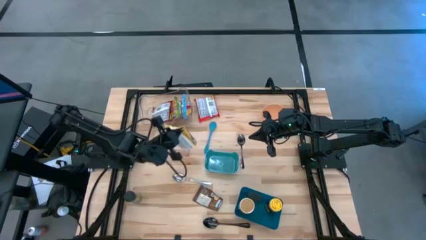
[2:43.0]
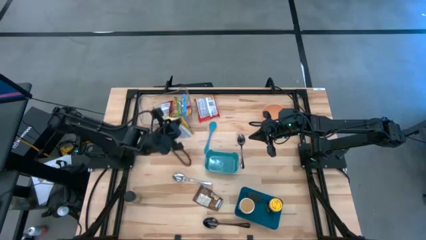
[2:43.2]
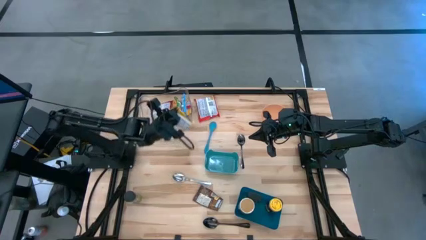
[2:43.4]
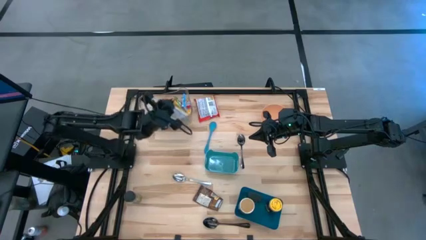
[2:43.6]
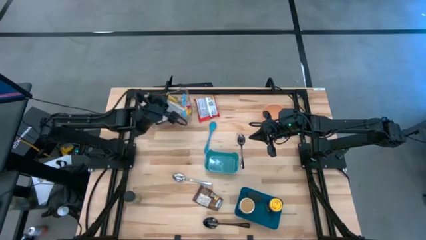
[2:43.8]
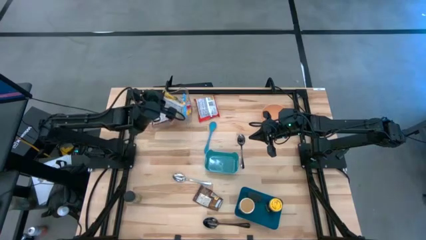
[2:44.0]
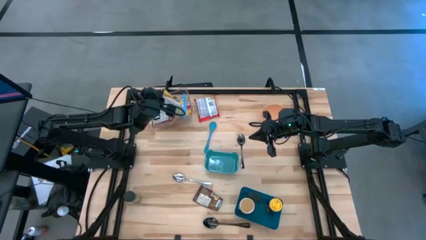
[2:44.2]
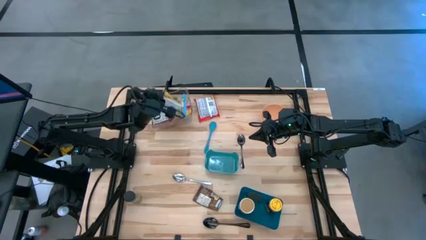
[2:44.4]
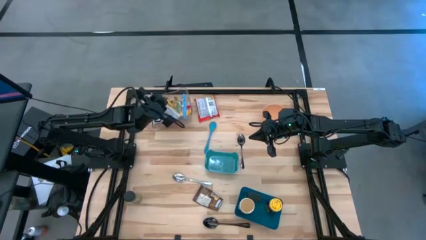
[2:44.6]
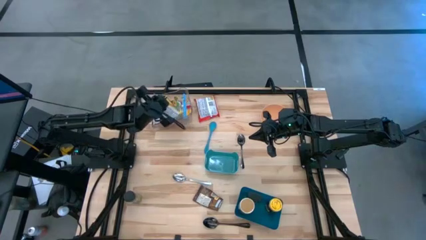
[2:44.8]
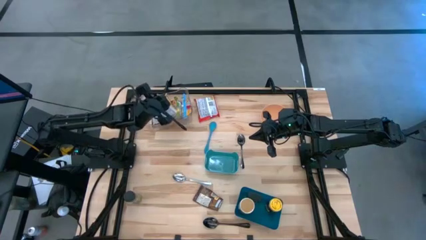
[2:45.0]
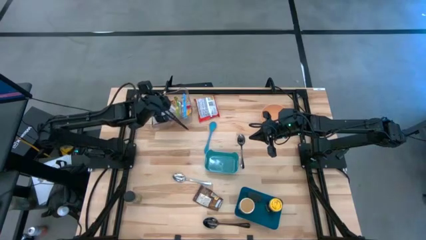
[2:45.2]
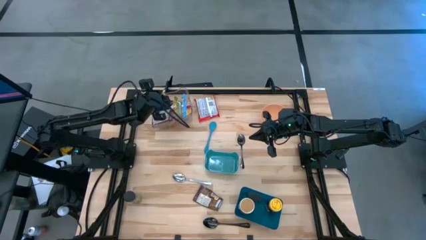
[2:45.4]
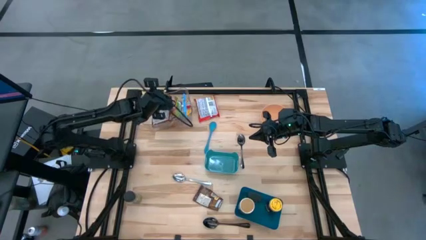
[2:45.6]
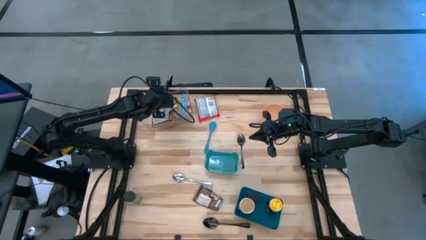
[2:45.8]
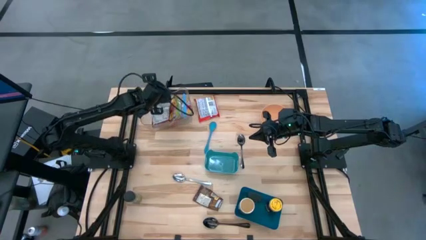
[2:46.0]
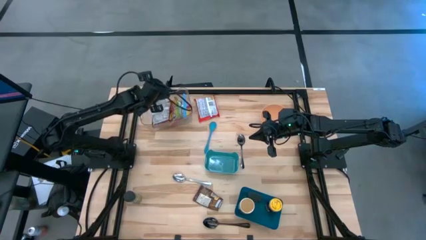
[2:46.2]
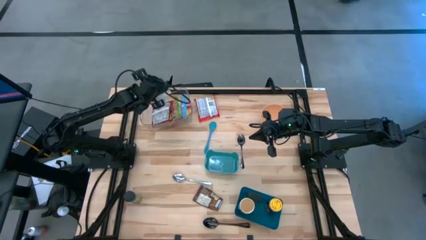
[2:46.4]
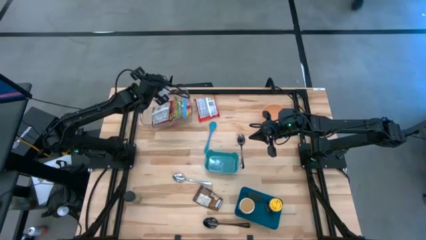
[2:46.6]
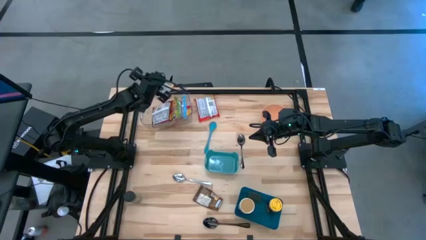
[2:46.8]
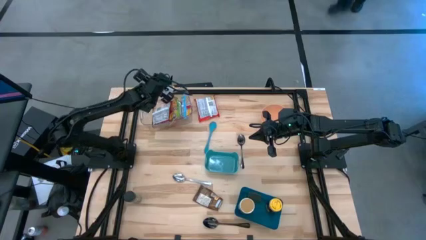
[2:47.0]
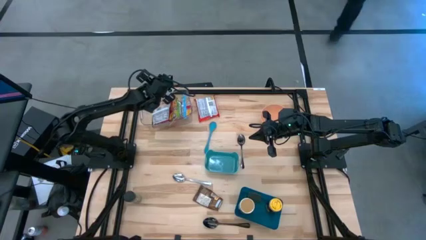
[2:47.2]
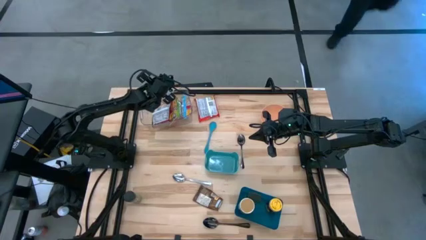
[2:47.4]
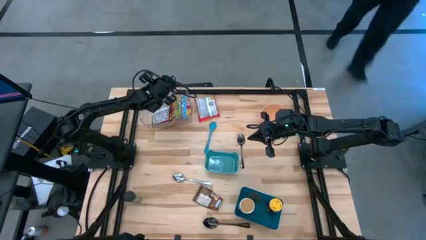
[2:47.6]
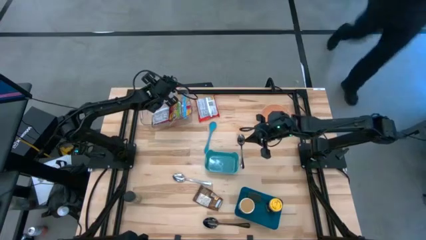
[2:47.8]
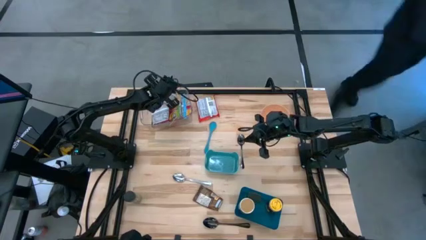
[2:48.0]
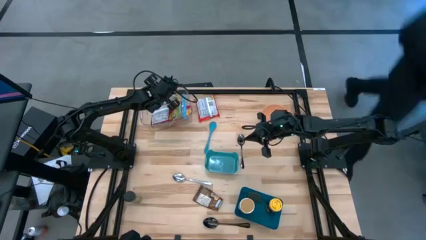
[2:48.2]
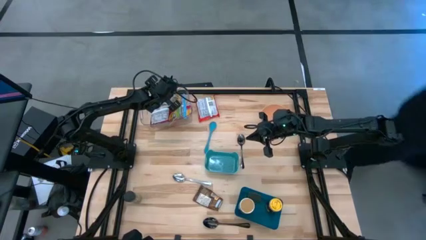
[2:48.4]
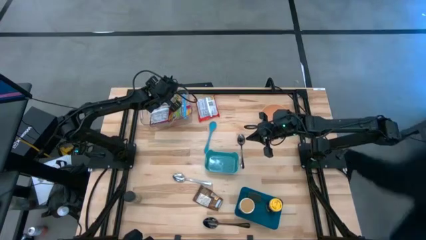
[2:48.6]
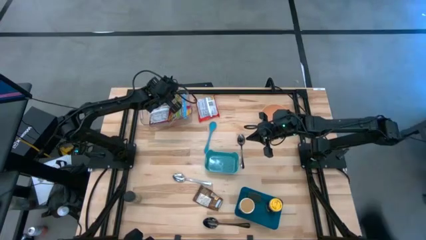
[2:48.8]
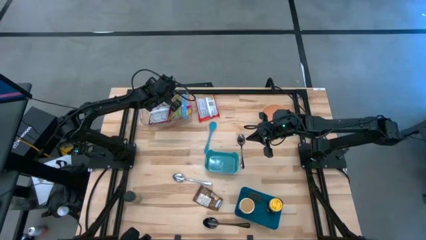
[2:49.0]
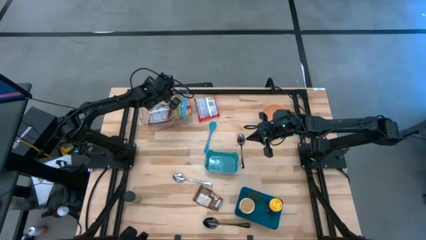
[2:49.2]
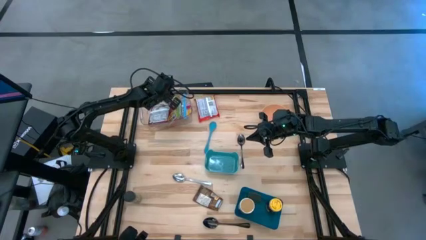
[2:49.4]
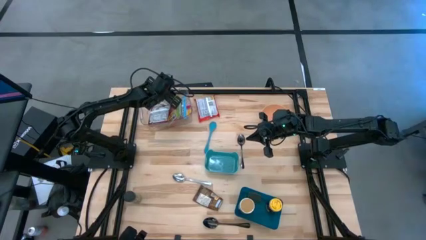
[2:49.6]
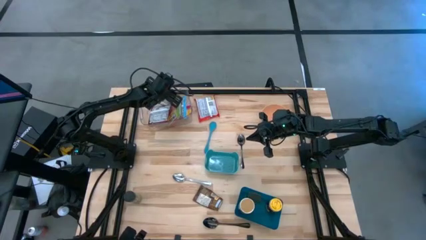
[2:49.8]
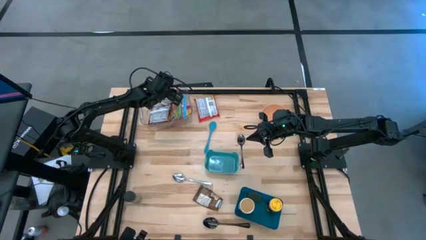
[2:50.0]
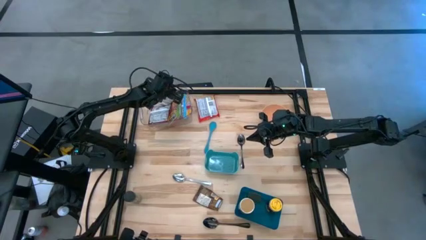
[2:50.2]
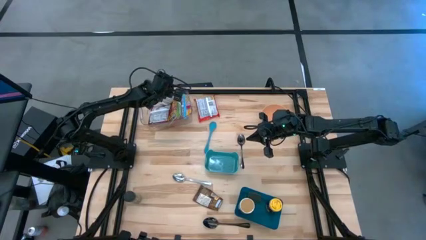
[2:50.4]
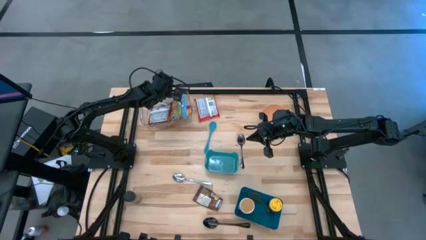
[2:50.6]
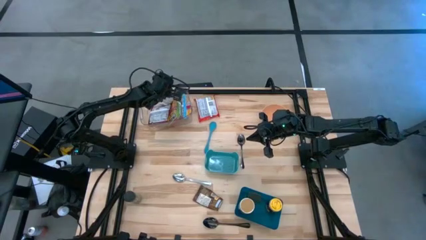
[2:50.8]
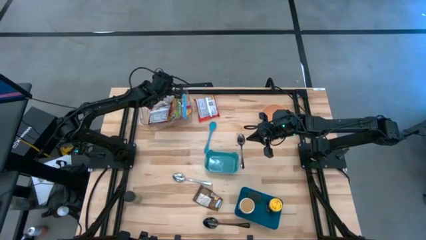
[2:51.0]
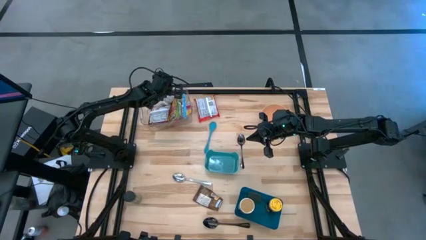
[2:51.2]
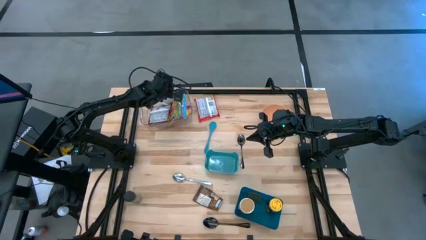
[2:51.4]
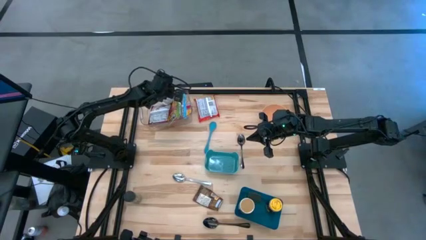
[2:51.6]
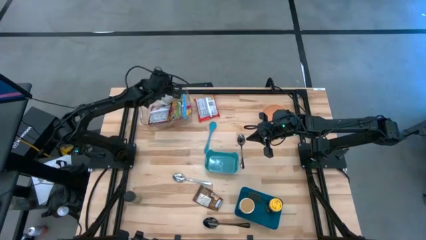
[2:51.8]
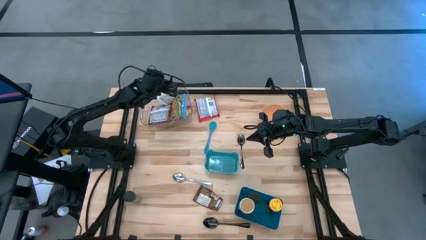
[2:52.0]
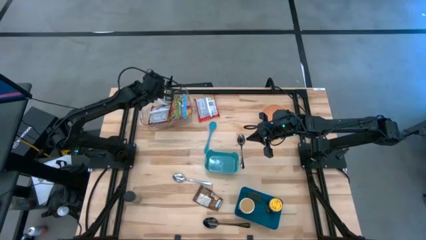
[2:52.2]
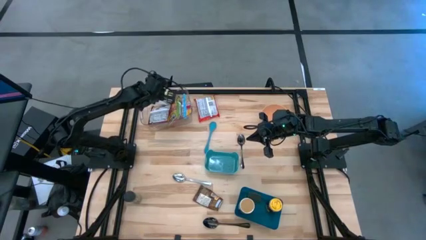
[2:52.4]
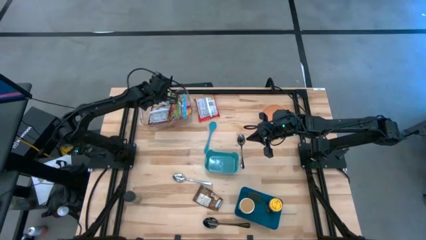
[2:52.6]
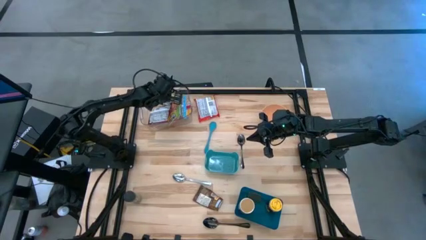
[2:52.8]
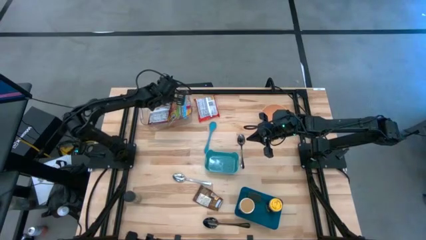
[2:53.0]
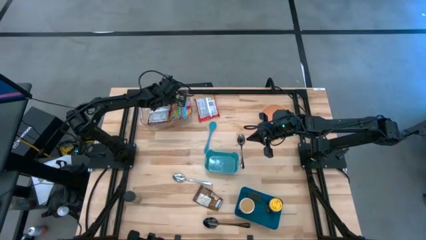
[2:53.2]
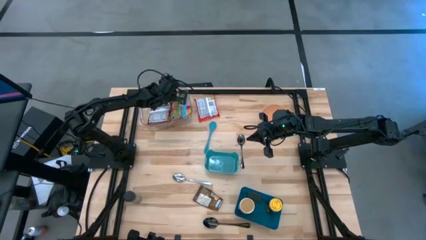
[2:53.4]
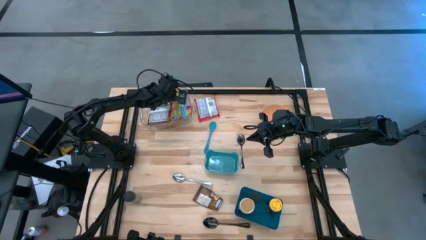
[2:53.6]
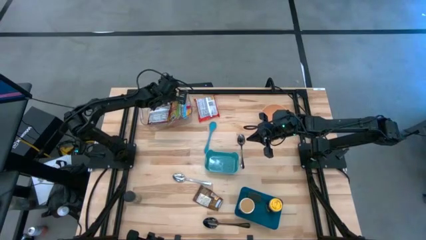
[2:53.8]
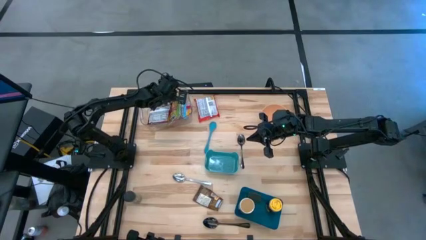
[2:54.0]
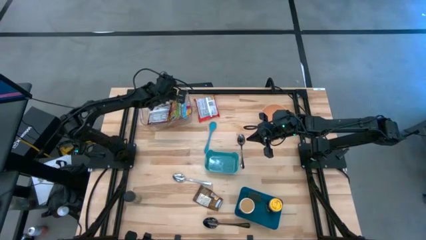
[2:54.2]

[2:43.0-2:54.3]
Task: Pick & Place Food Item
Put the yellow noodle pack into the transparent bin
